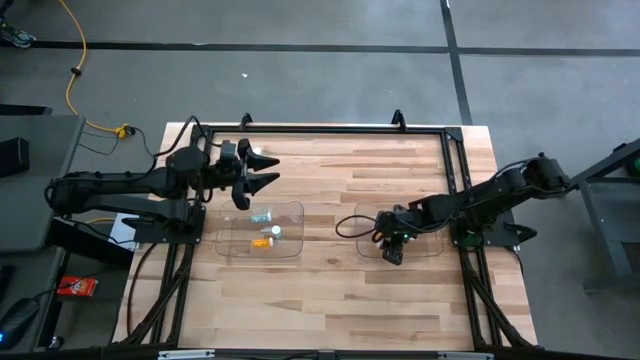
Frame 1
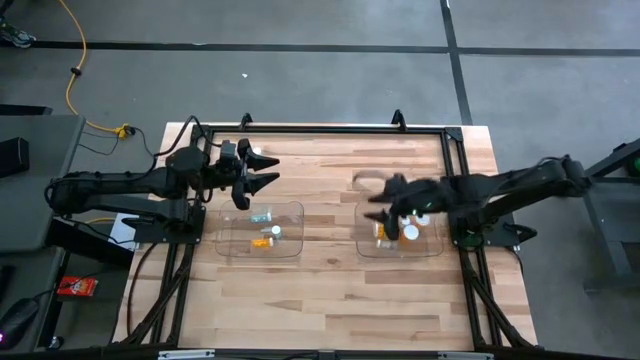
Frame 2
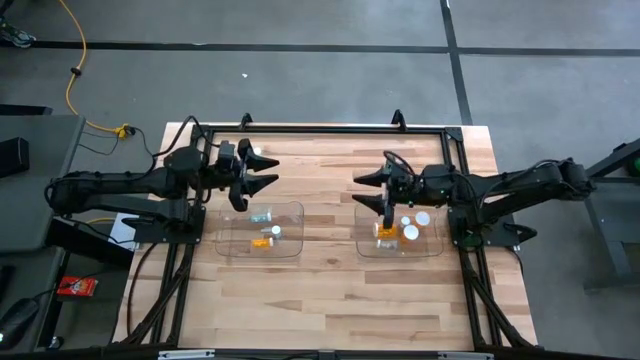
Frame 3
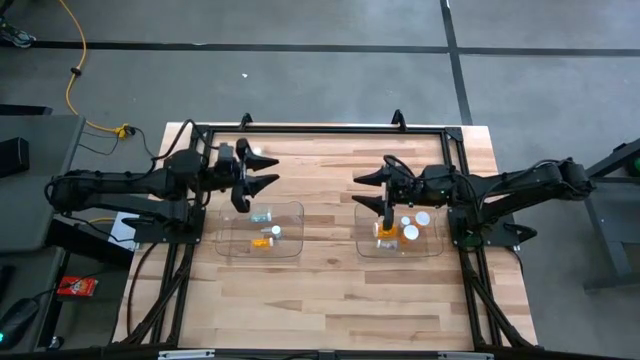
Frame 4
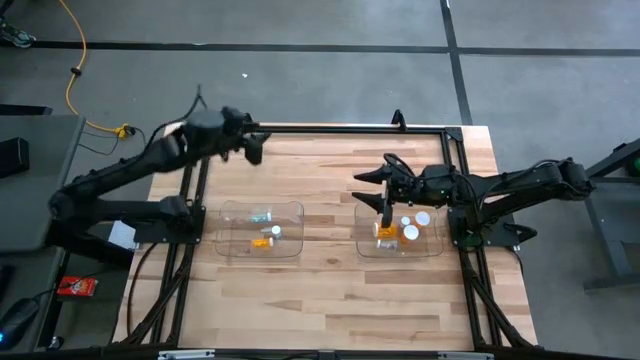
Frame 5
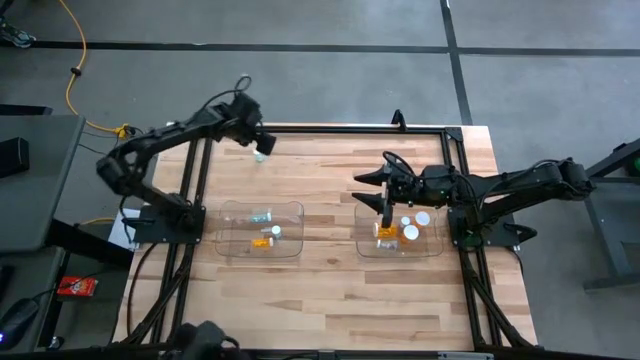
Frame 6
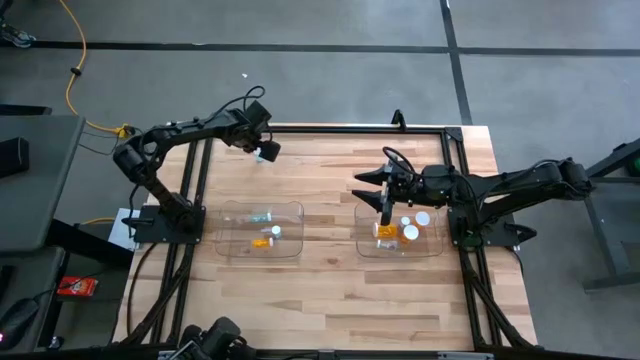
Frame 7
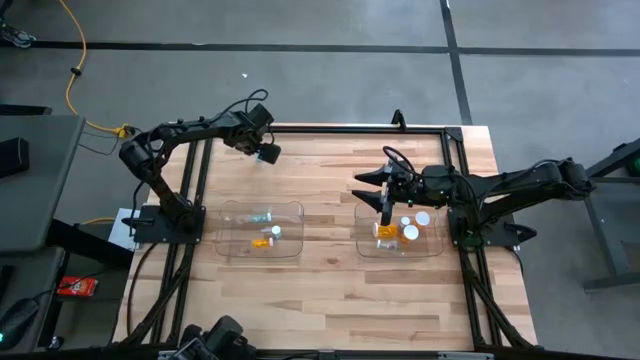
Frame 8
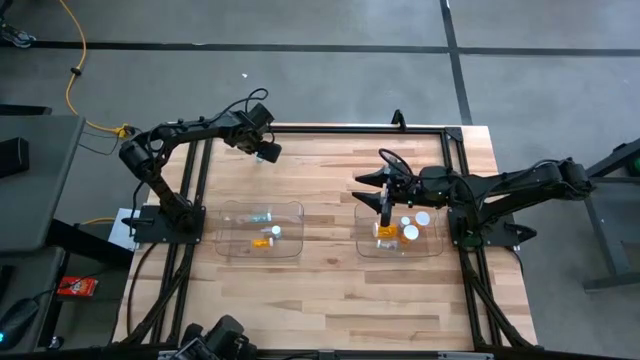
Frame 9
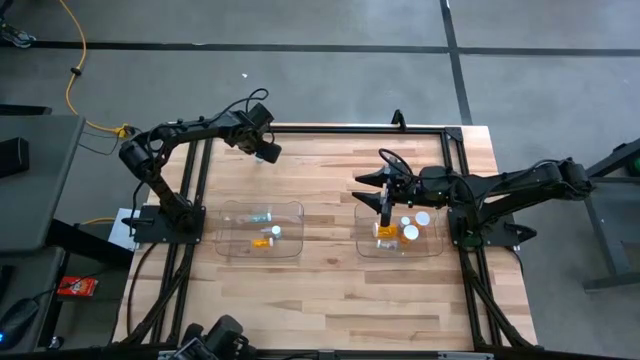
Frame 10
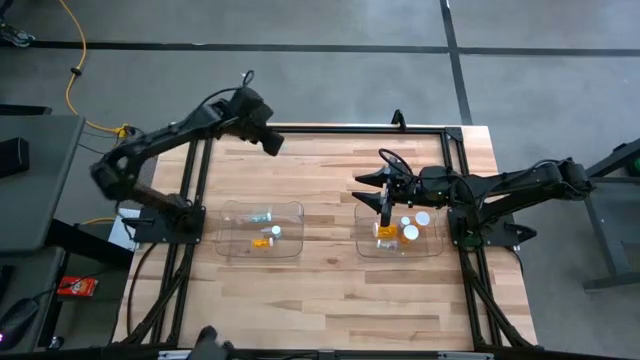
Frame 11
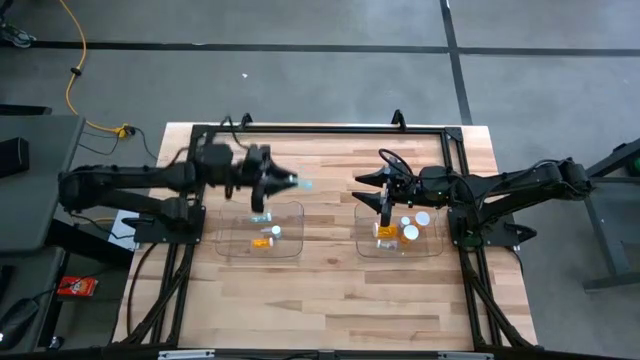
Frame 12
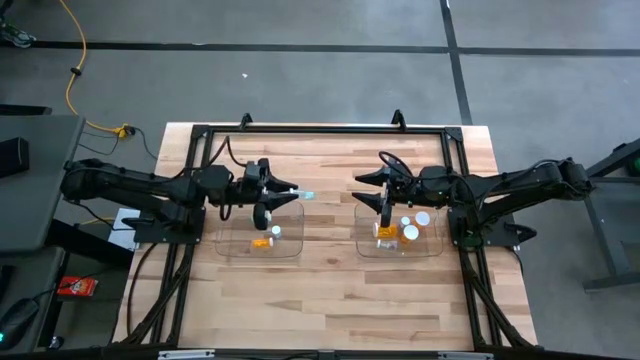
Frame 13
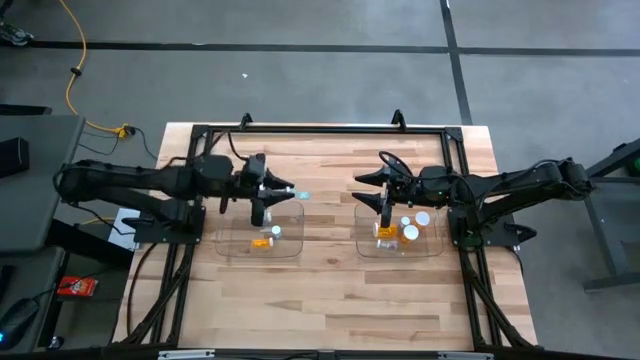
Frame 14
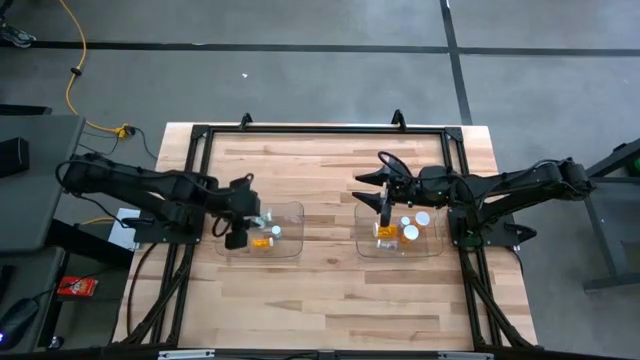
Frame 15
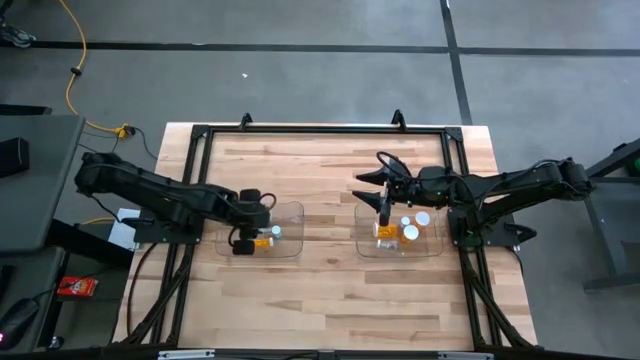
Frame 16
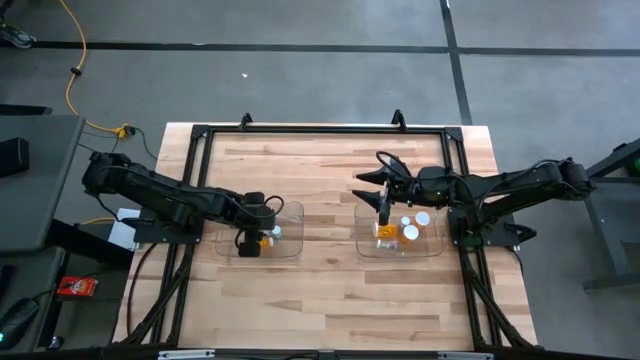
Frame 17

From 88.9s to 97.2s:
Task: Pick and place medicine bottles into bin by pill shape (circle, oval)
Put the blue tablet bottle into the left transparent bin

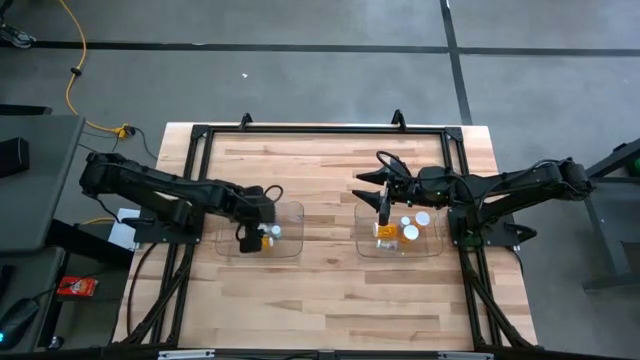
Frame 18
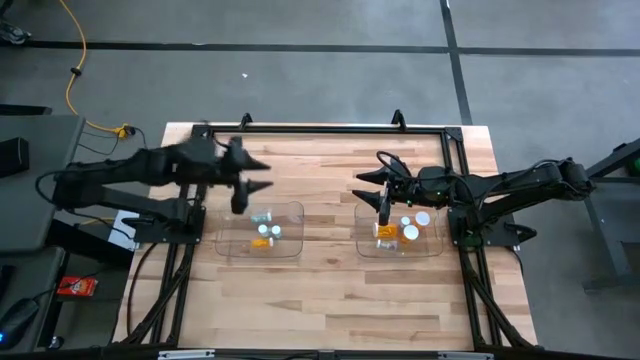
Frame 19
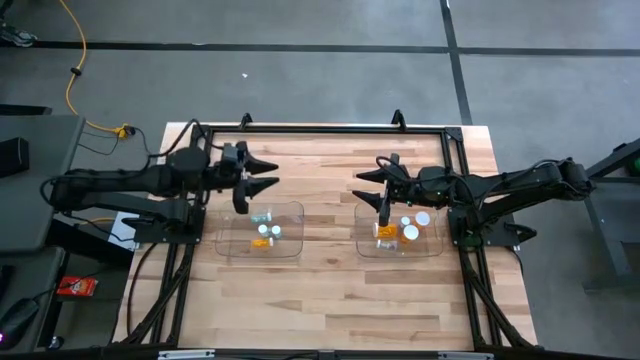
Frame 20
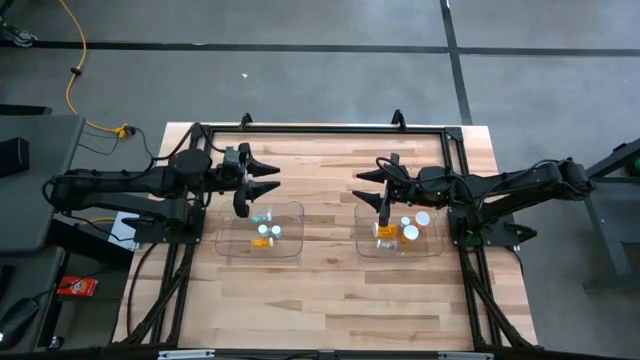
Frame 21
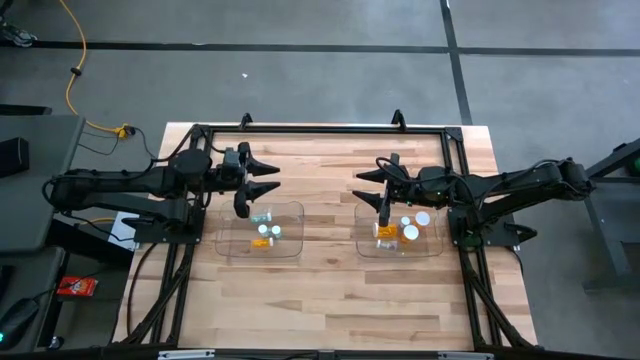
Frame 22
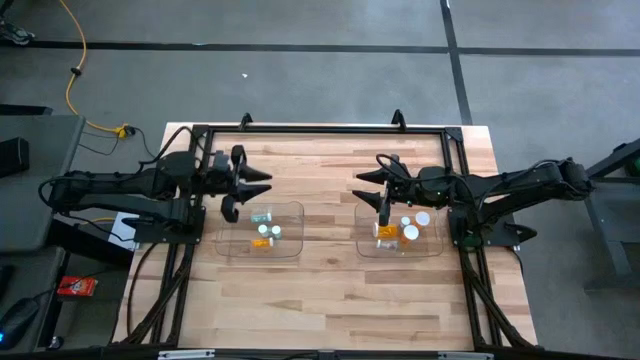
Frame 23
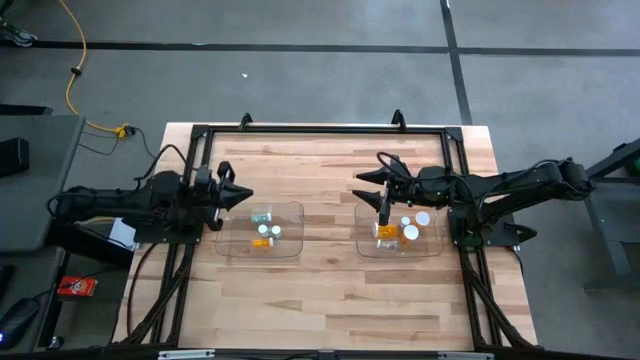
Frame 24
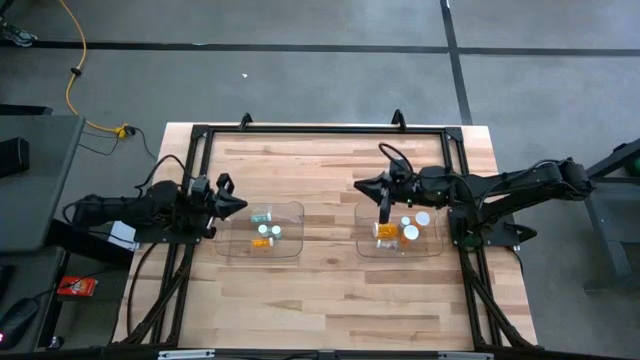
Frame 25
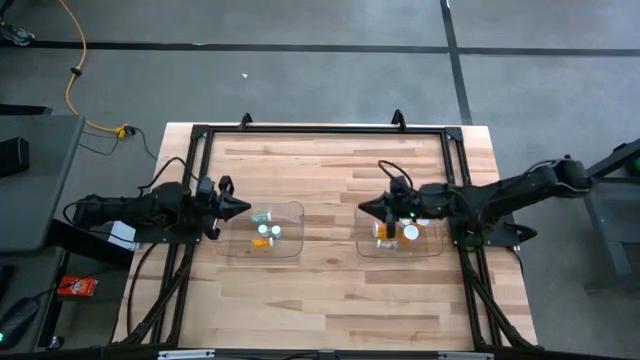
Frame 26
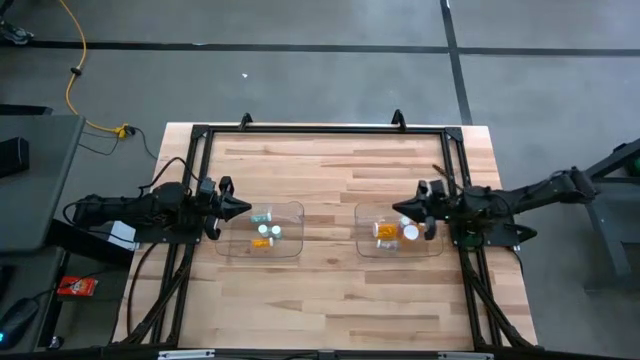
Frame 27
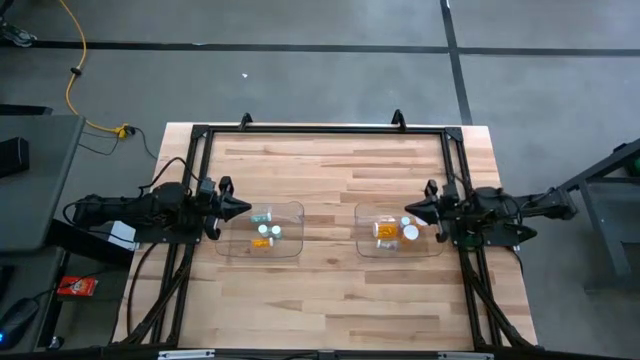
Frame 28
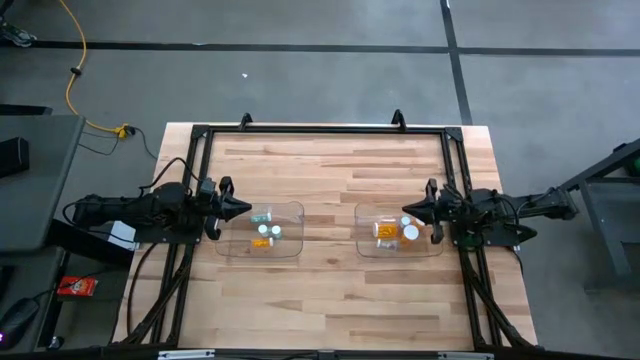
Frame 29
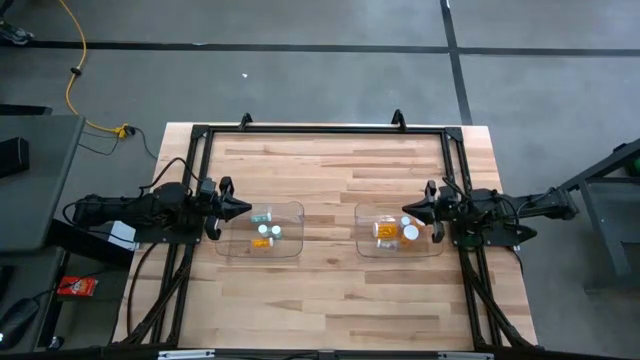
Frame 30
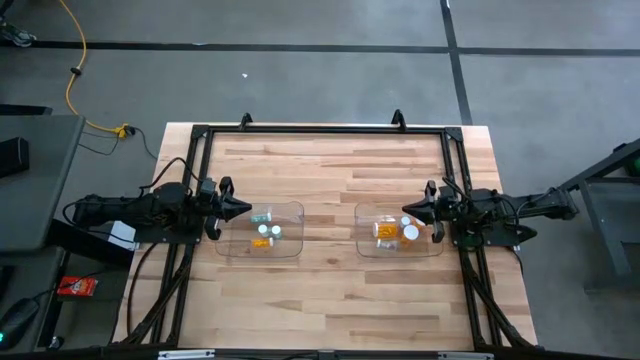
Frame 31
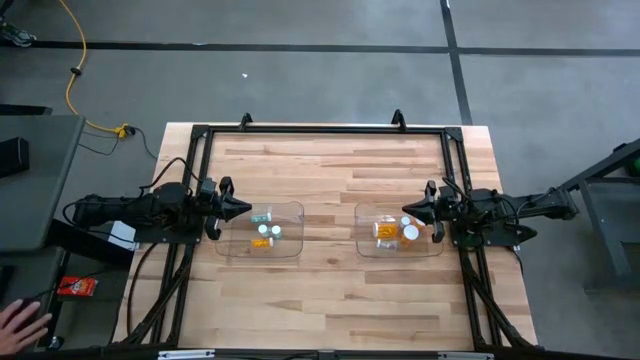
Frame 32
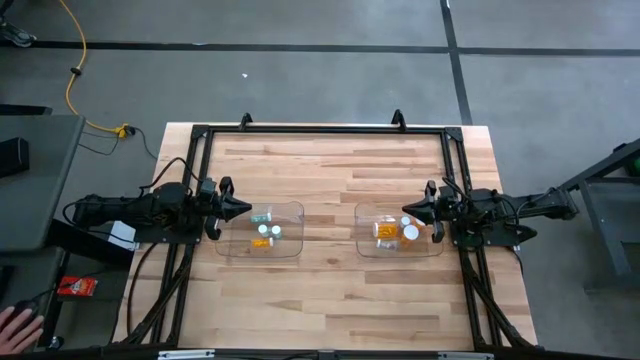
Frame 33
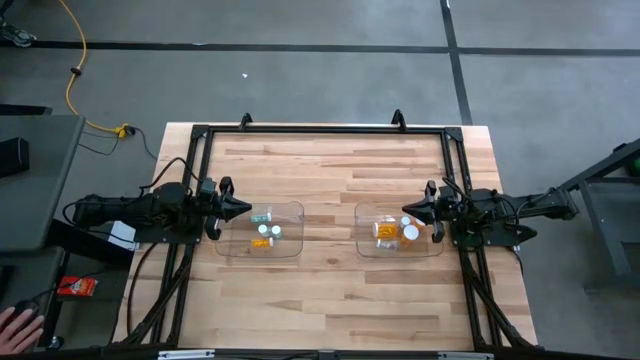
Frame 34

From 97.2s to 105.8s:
Return to Home Position

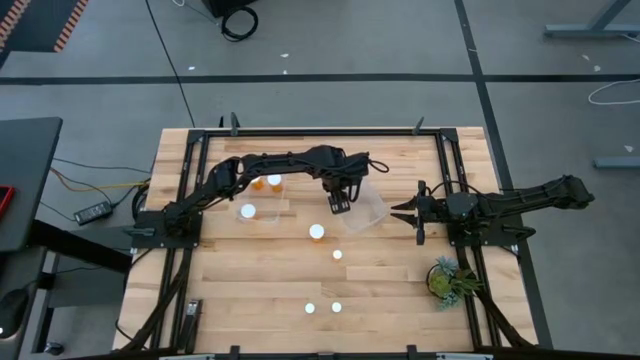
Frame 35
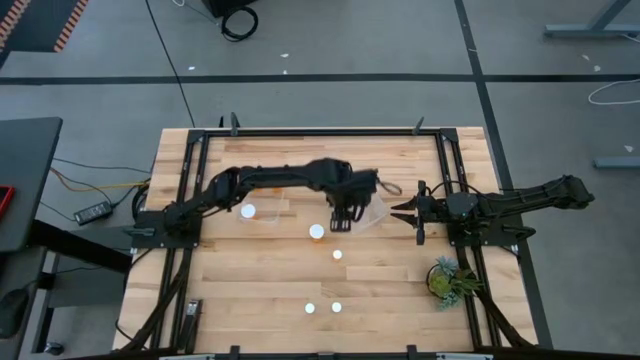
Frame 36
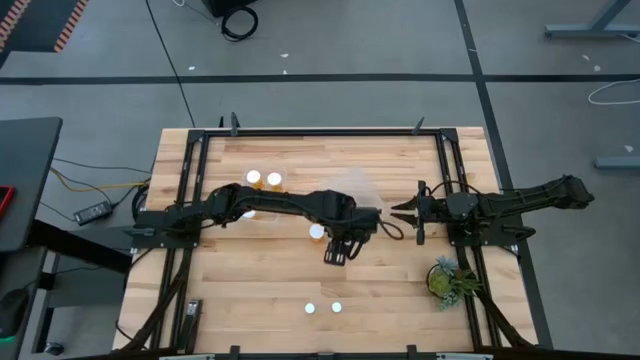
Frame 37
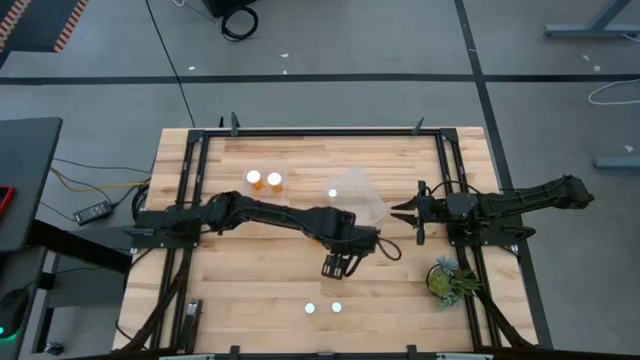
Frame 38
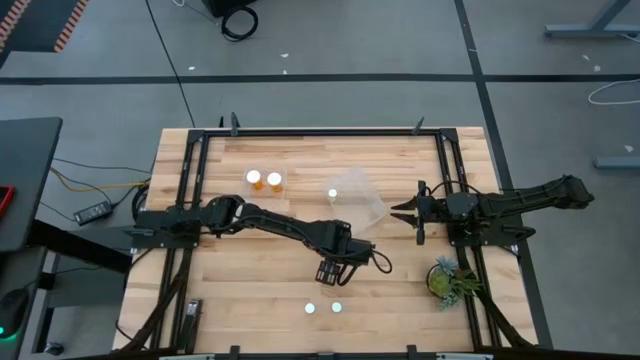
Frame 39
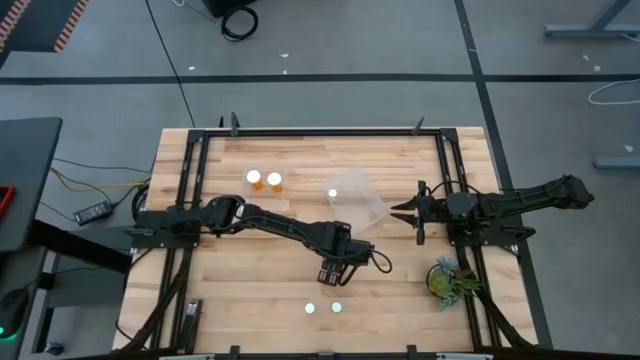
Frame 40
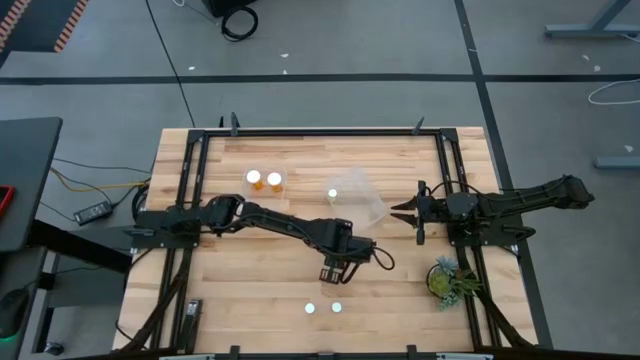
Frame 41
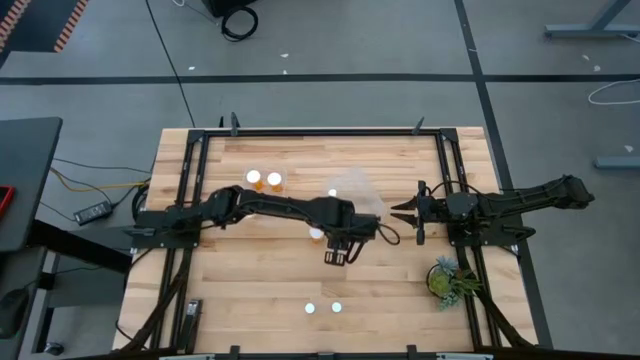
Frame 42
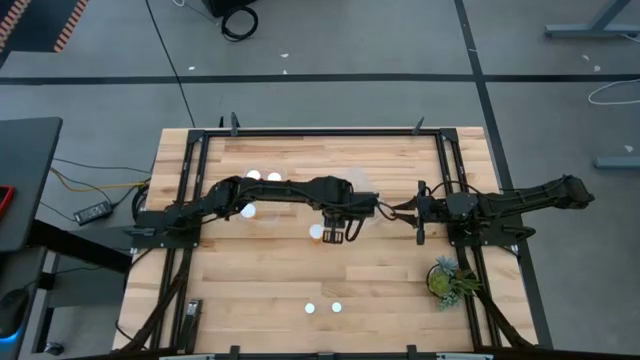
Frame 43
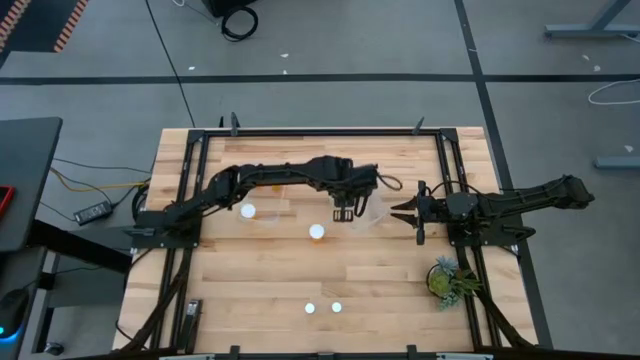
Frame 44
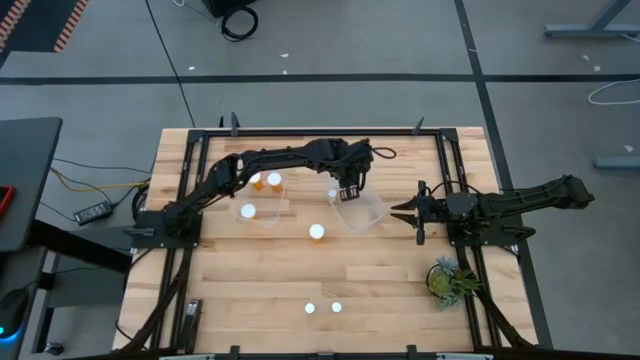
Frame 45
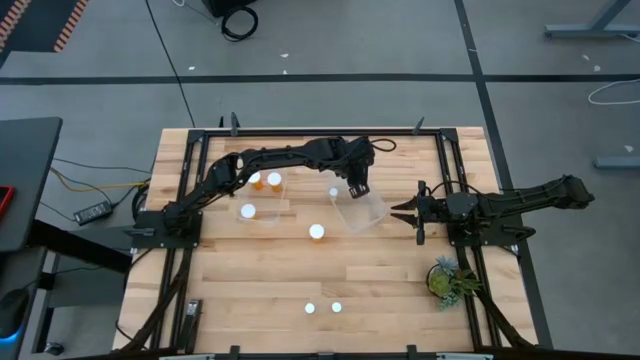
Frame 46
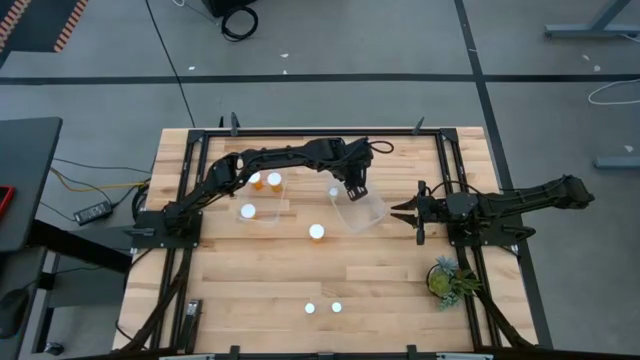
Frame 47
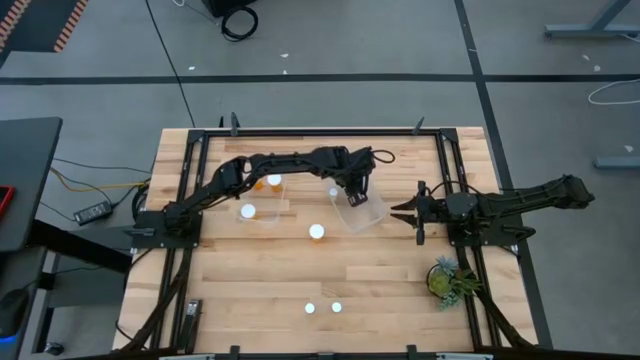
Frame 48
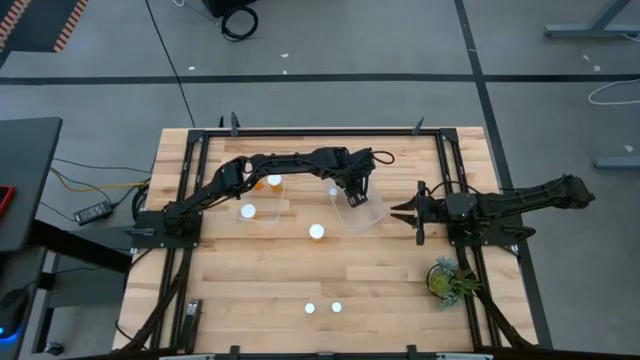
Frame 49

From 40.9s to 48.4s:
Task: Pick and place medicine bottles into bin by pill shape (circle, oval)
Put the small orange pill bottle into the right transparent bin
